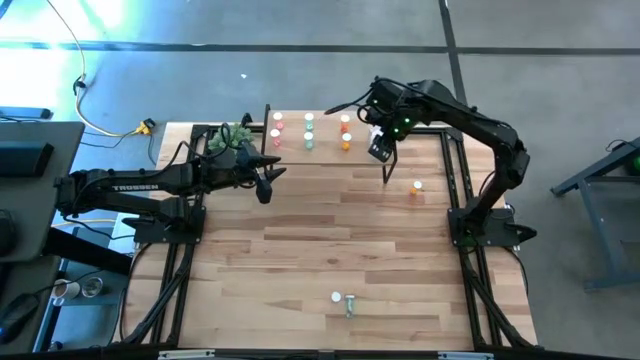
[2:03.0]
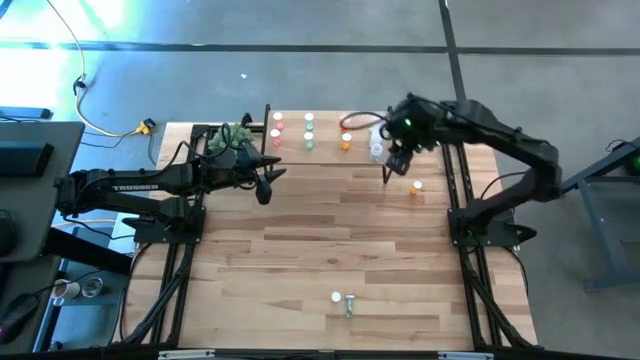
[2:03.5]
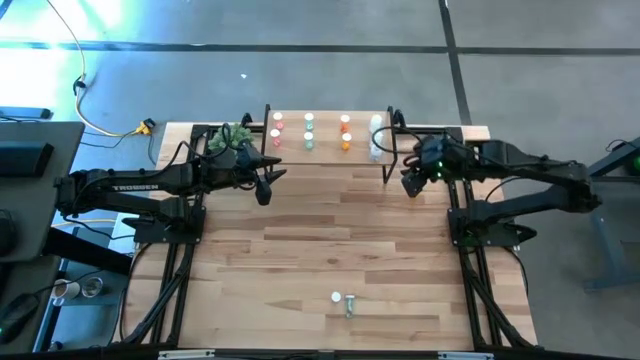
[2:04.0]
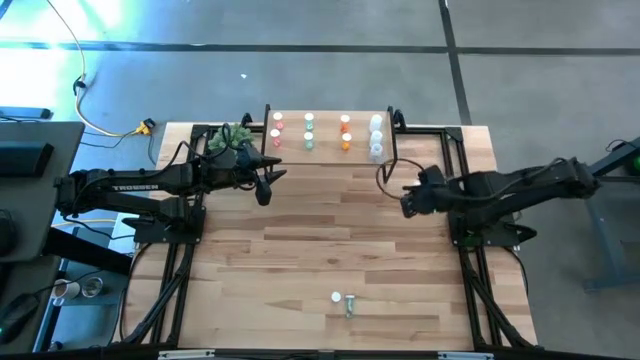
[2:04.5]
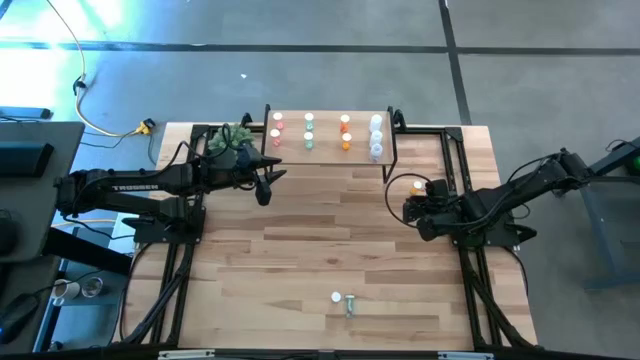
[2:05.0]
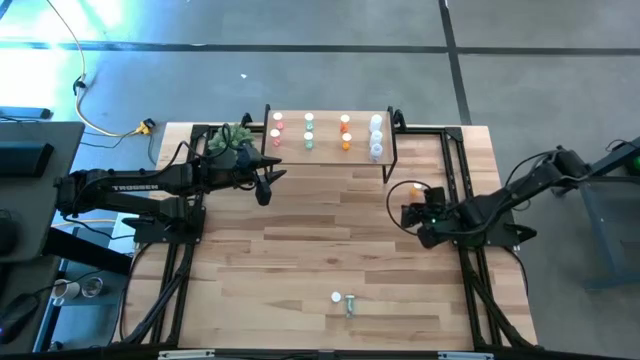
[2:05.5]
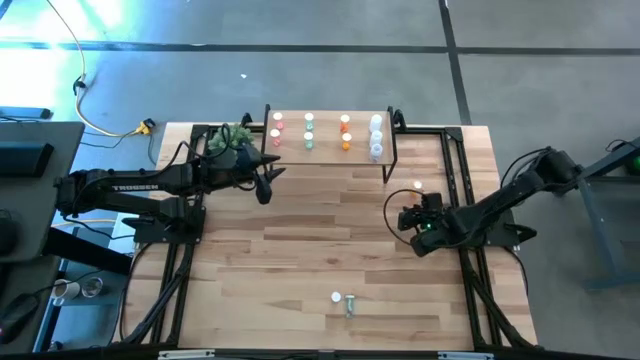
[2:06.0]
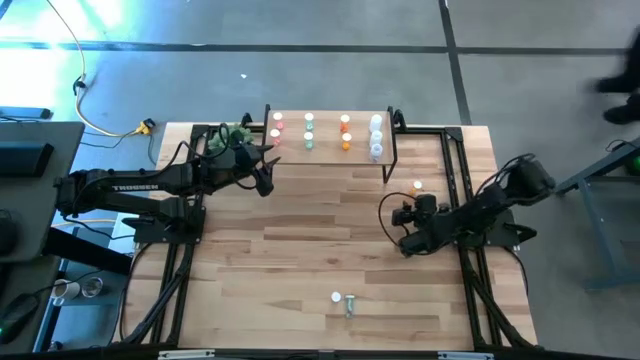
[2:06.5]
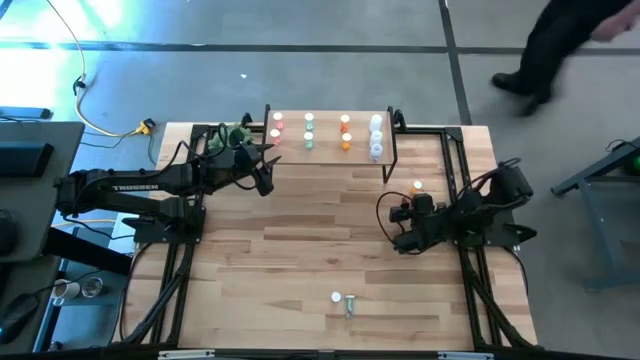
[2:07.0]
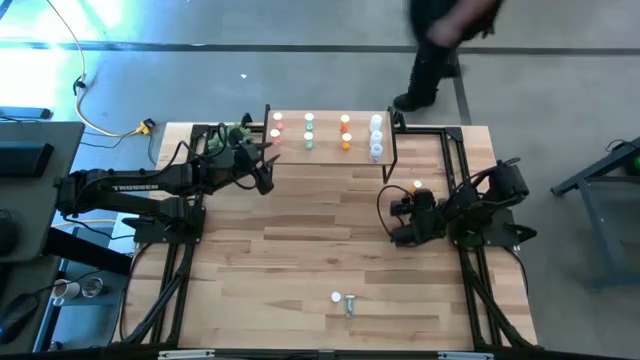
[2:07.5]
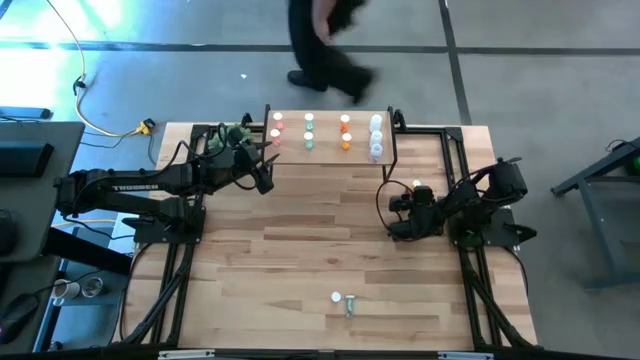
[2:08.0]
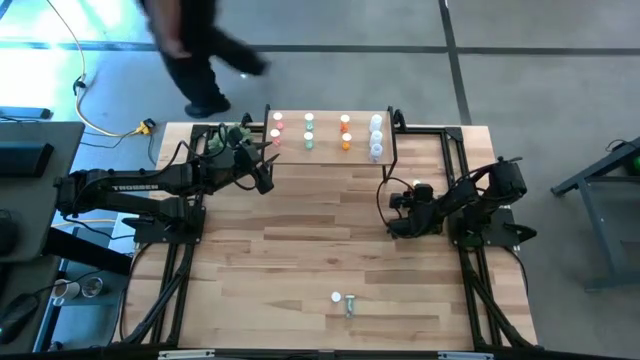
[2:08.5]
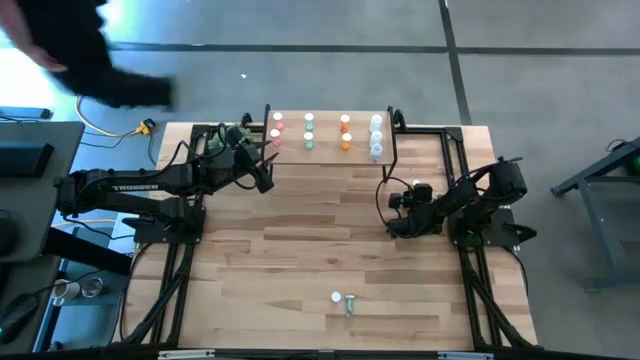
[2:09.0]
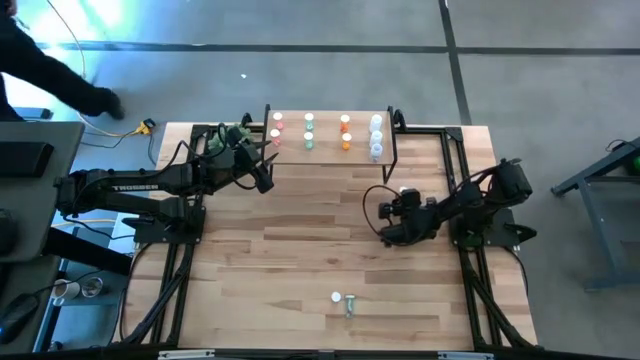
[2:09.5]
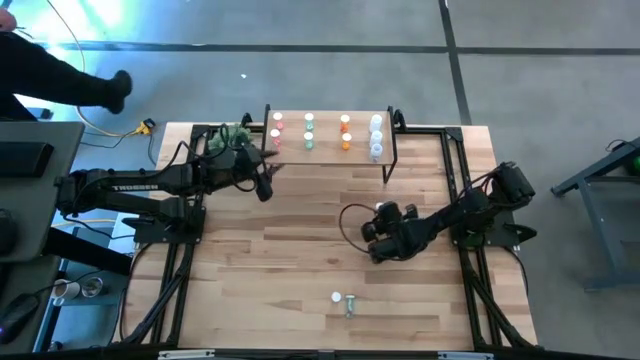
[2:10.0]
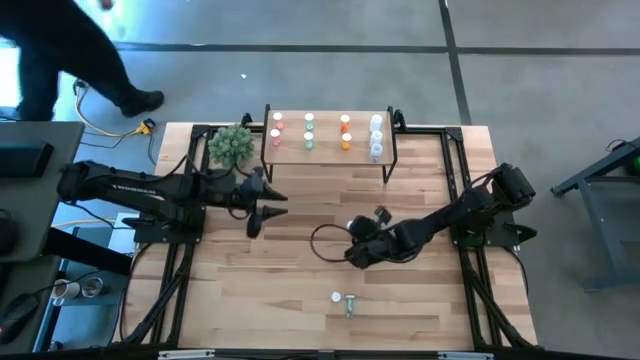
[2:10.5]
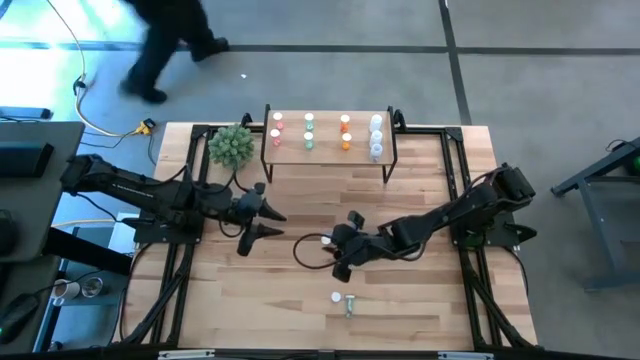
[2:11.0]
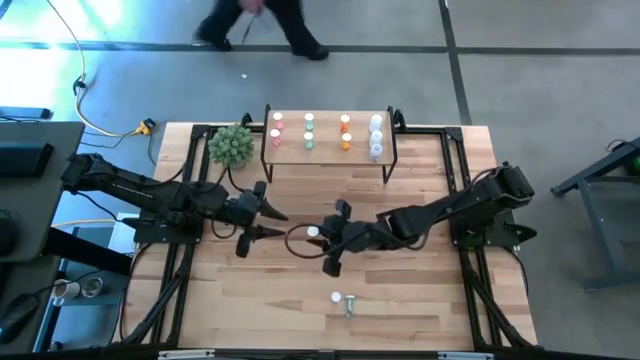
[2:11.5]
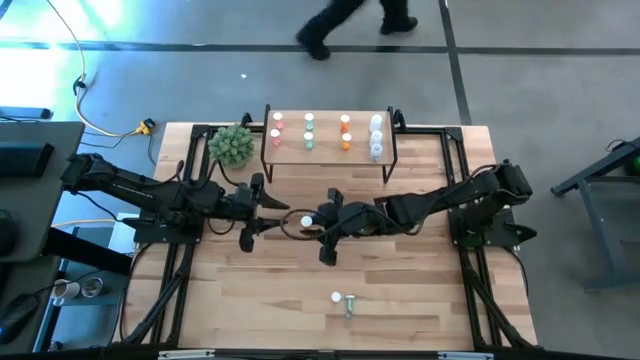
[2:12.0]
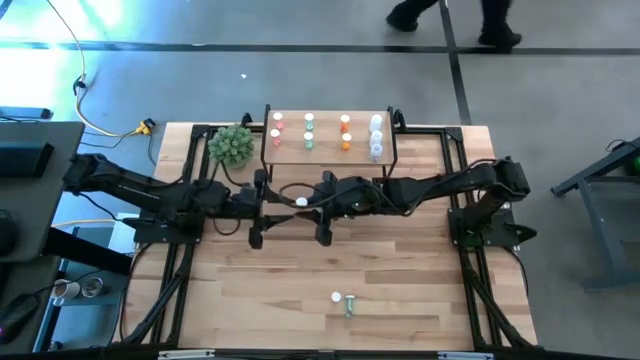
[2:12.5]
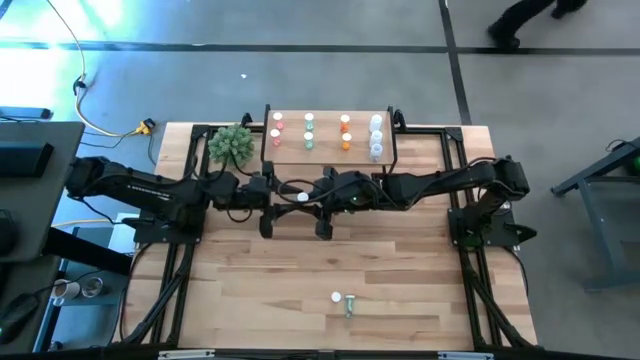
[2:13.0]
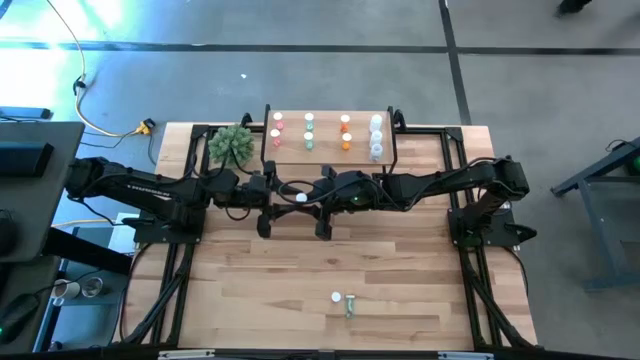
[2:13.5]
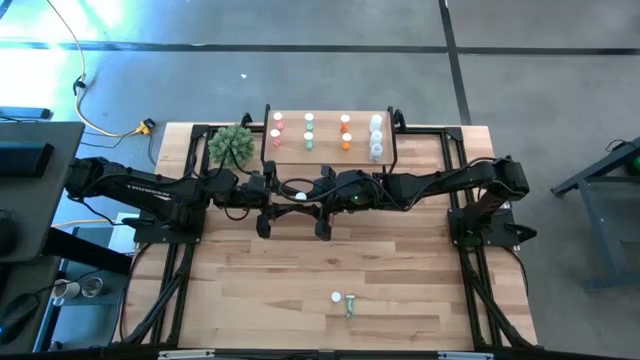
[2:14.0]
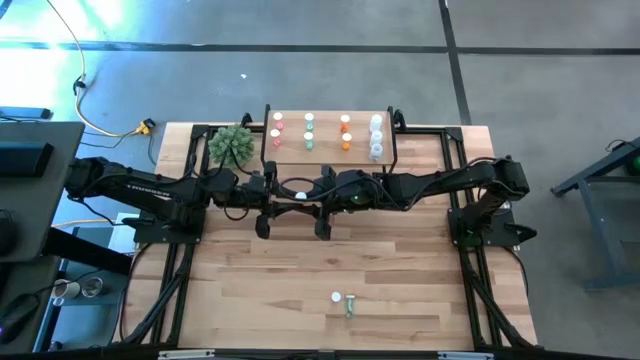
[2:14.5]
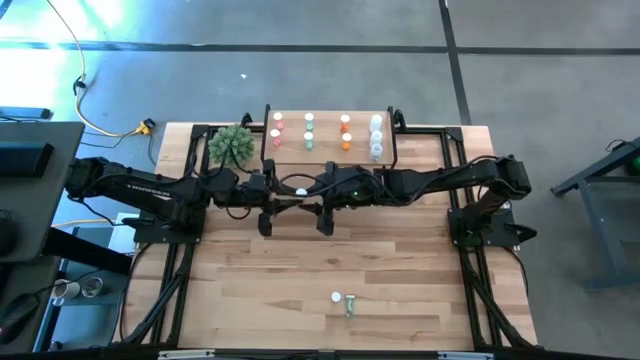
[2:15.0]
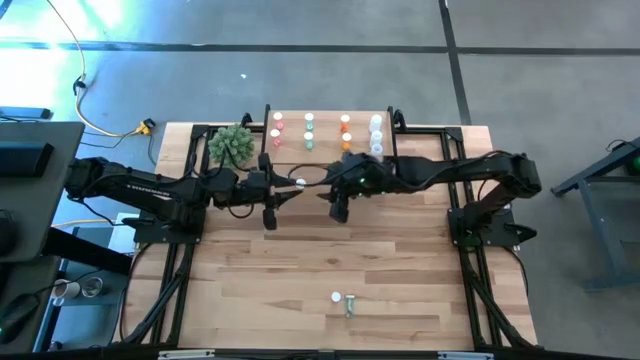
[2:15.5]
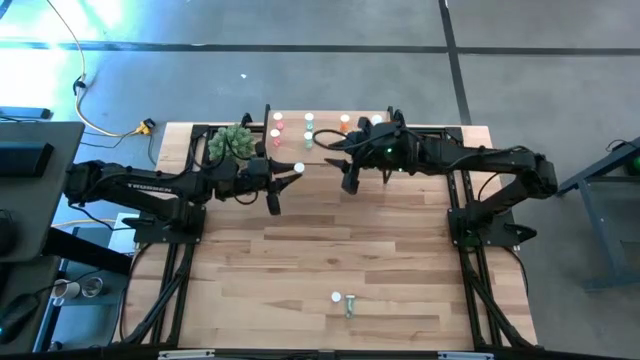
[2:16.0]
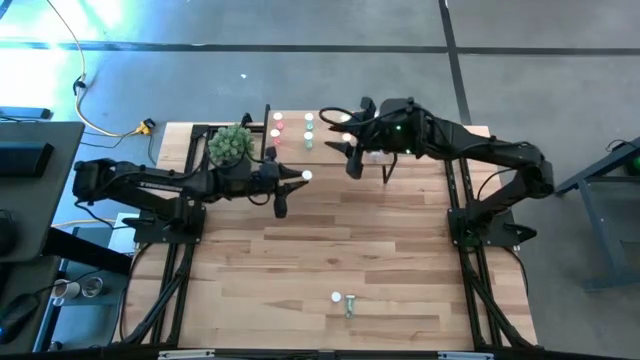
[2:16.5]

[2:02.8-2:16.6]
Task: Pick and place medicine bottles onto shelf by color
Put the orange pill bottle on the shelf aligned with the other orange pill bottles

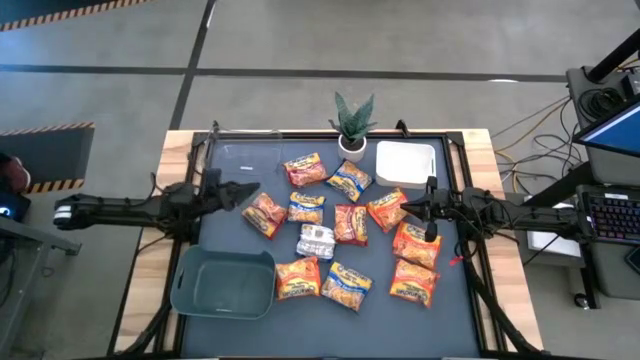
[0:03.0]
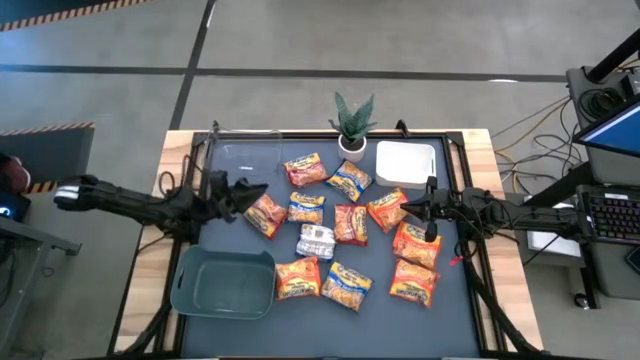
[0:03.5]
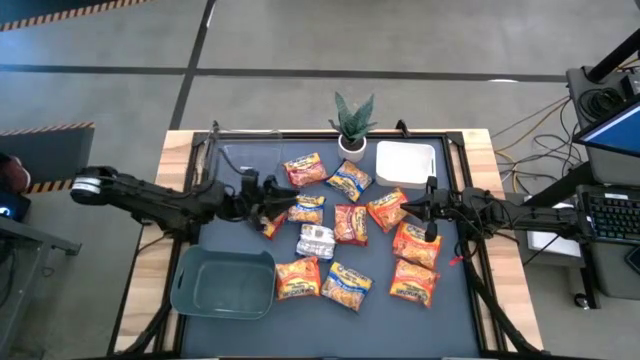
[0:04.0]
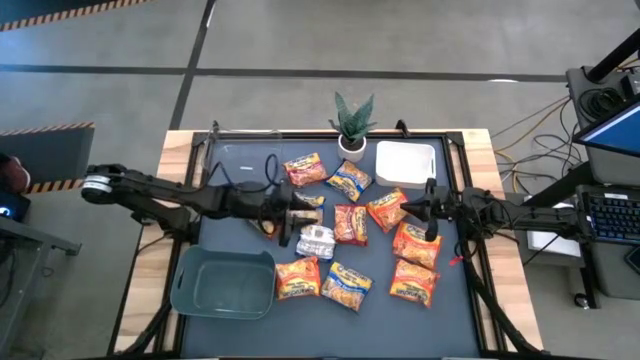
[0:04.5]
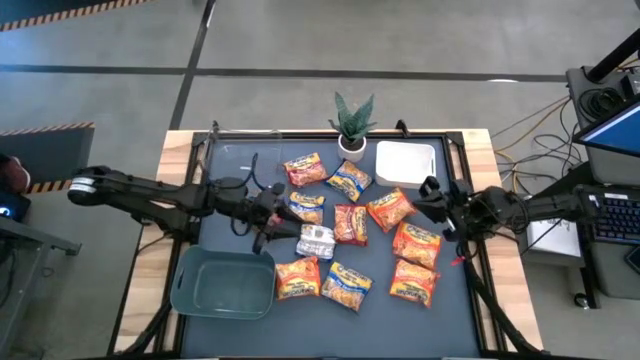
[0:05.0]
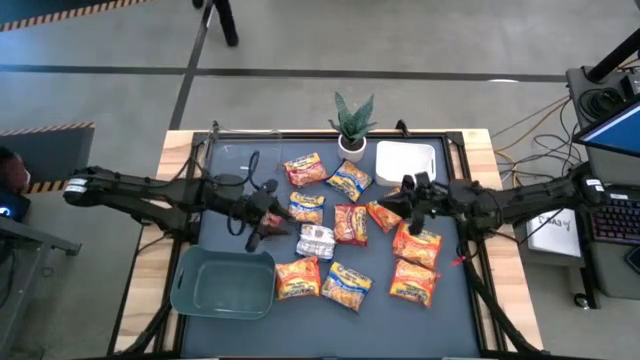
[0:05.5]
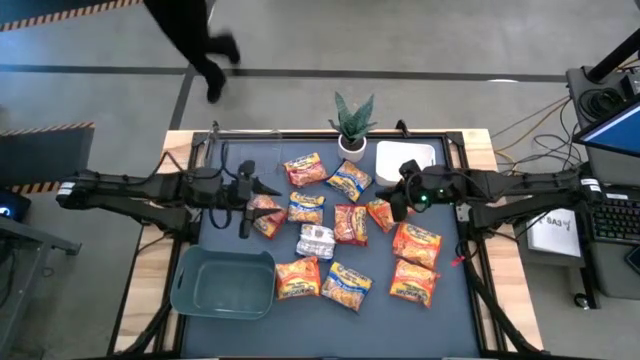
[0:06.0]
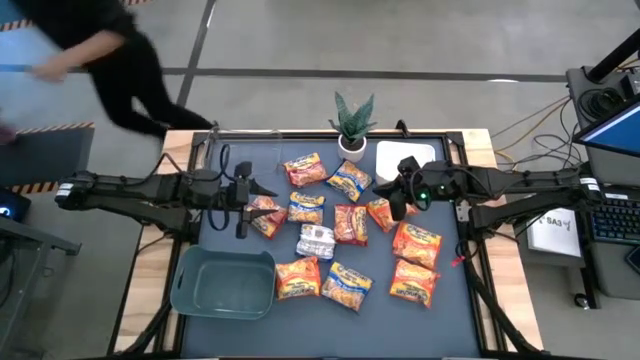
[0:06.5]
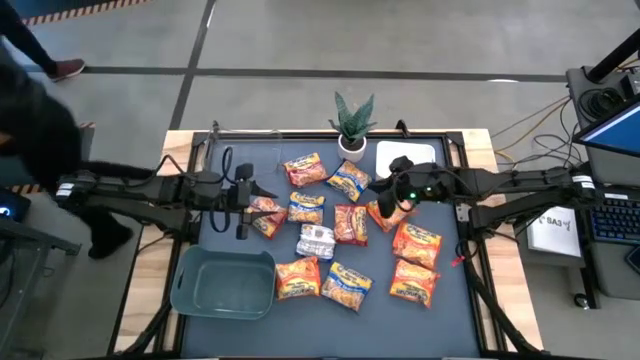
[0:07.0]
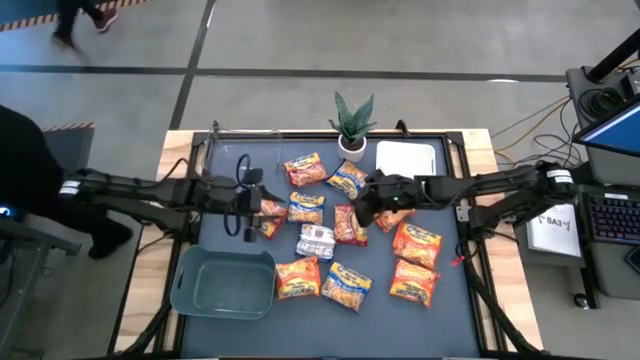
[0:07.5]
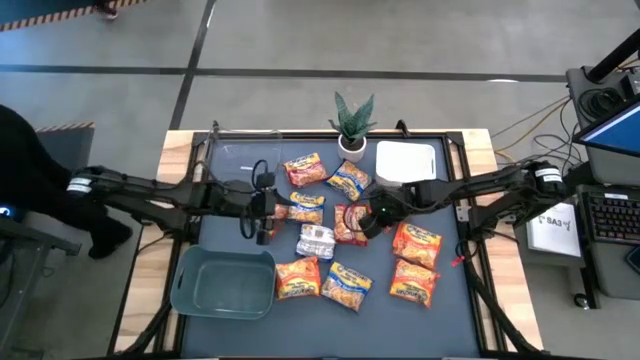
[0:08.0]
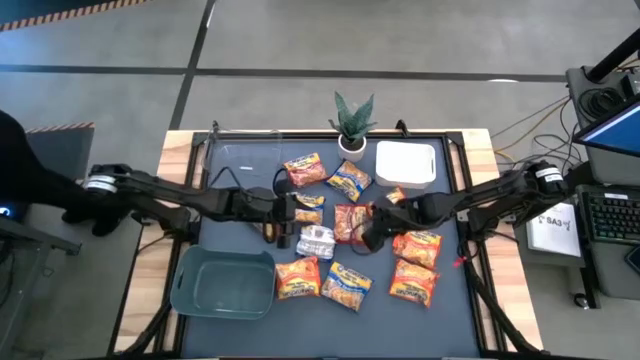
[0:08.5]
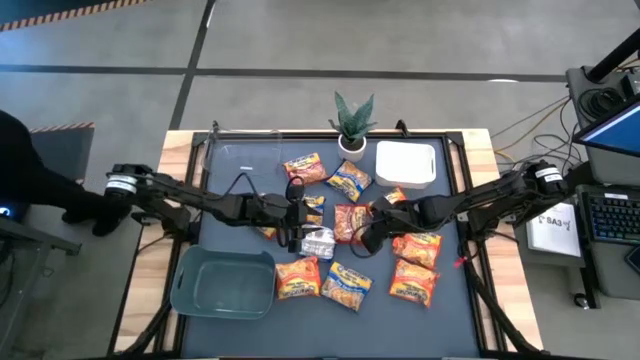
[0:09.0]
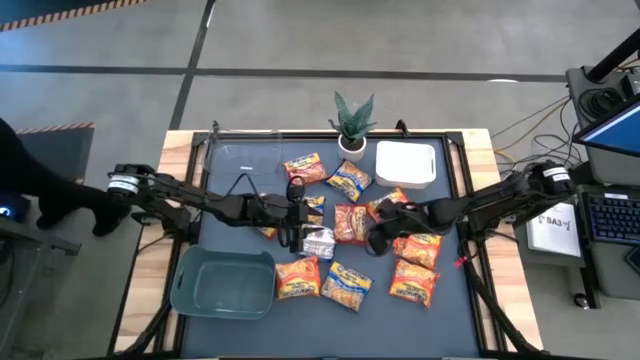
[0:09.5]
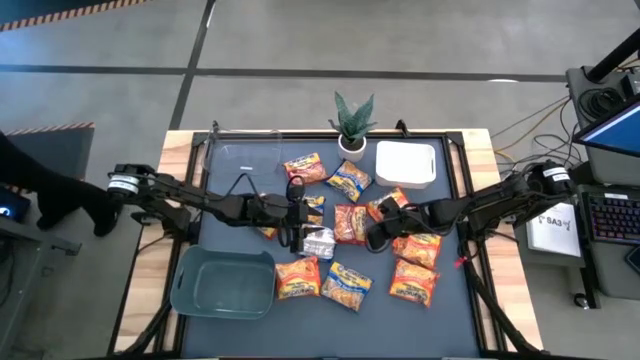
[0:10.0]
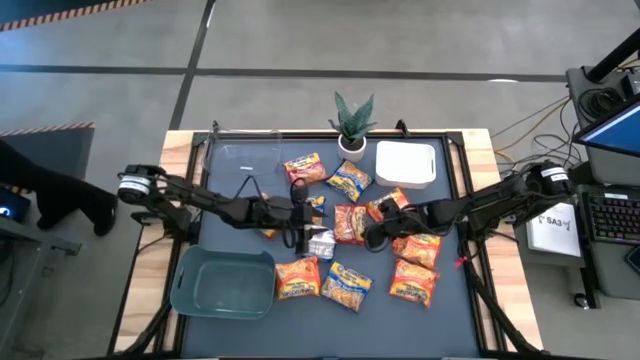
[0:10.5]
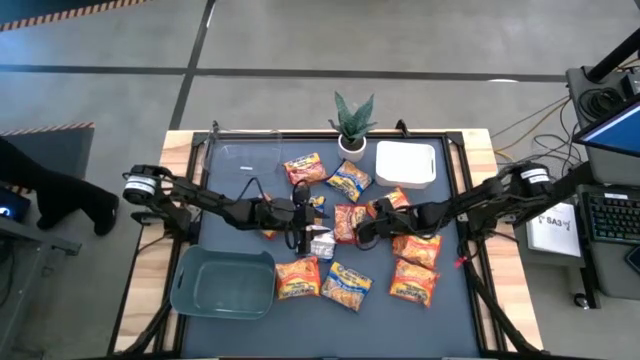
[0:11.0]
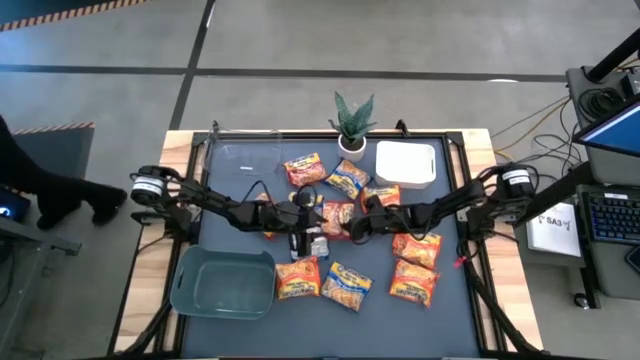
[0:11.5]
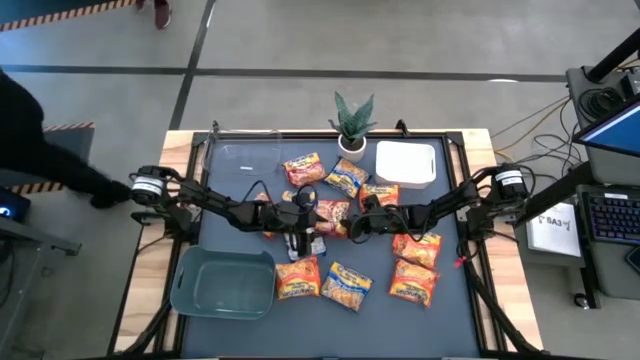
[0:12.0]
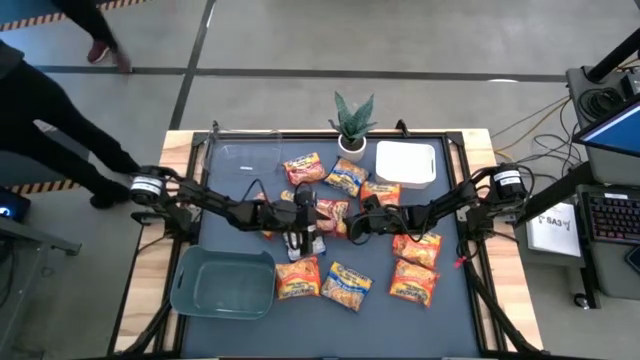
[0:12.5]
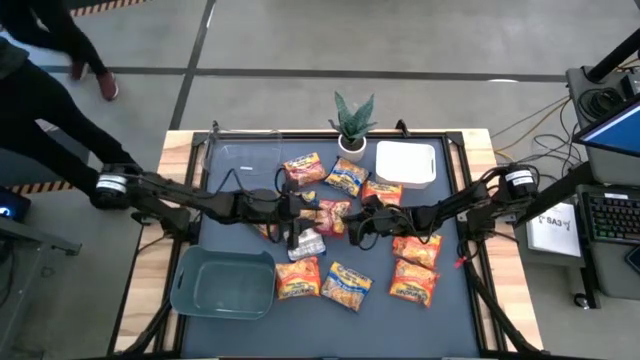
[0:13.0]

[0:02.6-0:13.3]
Task: Sort Maruchan noodles
Put the red noodle pack into the white bin
